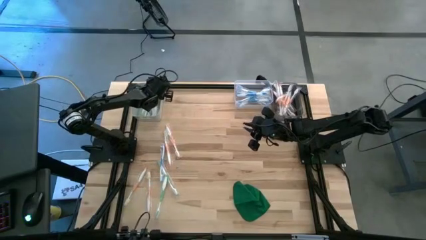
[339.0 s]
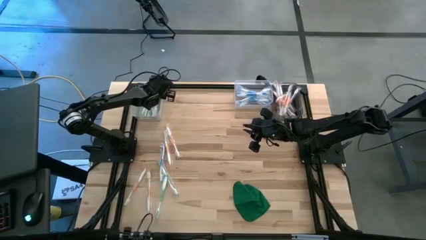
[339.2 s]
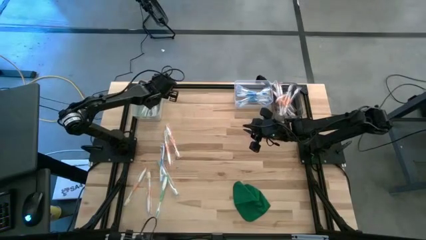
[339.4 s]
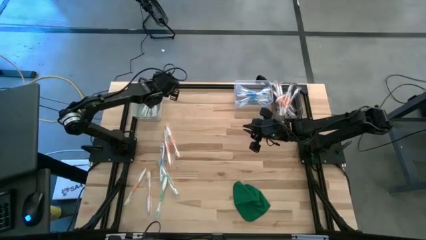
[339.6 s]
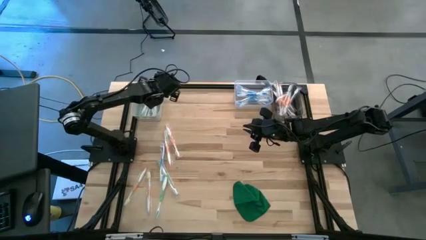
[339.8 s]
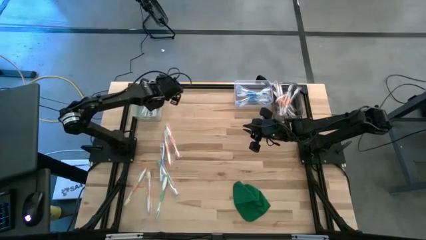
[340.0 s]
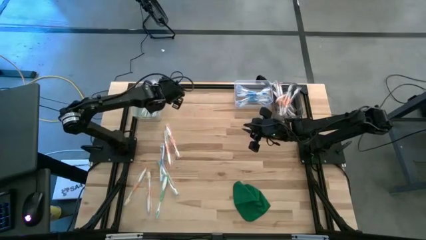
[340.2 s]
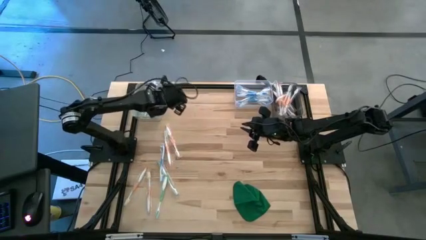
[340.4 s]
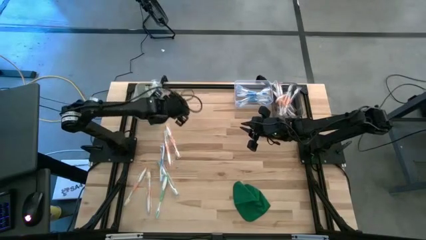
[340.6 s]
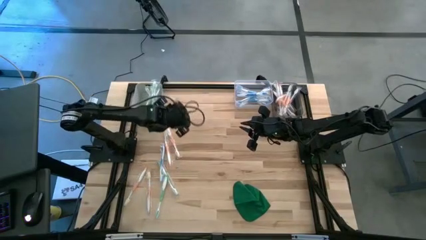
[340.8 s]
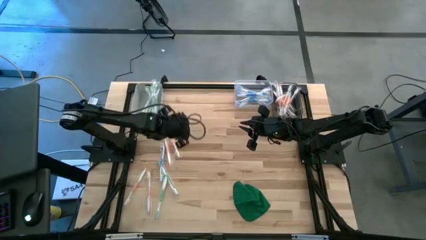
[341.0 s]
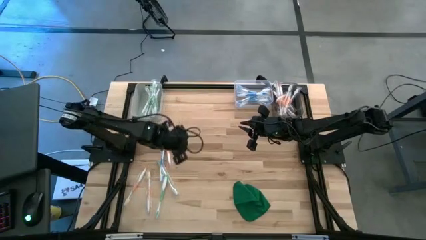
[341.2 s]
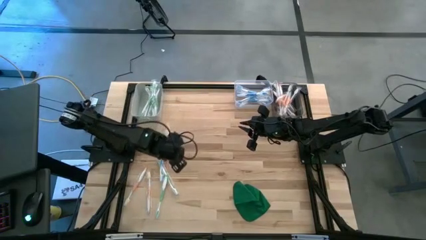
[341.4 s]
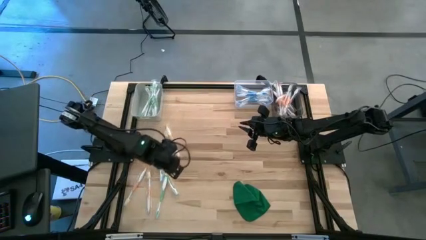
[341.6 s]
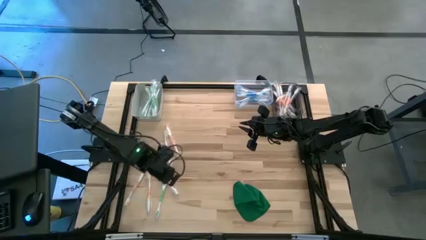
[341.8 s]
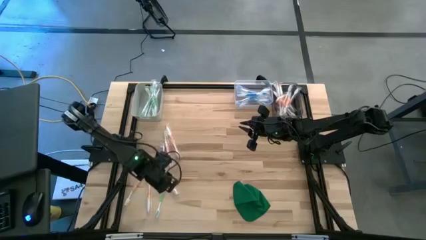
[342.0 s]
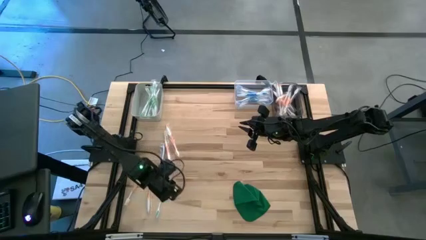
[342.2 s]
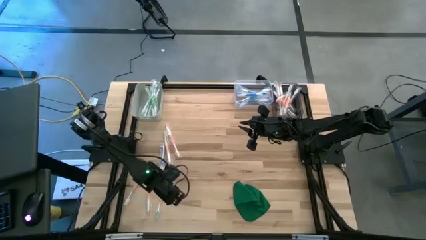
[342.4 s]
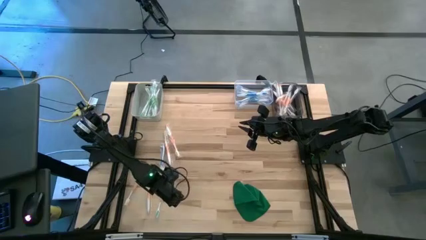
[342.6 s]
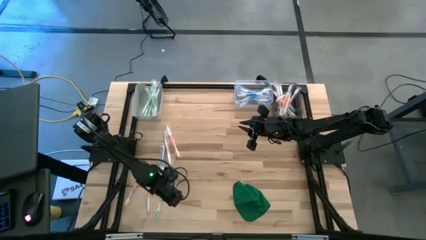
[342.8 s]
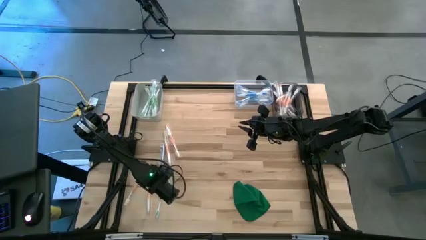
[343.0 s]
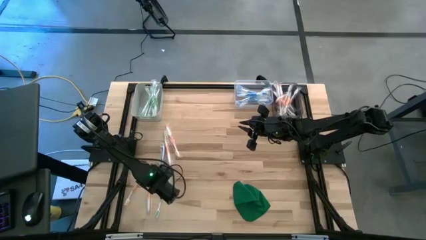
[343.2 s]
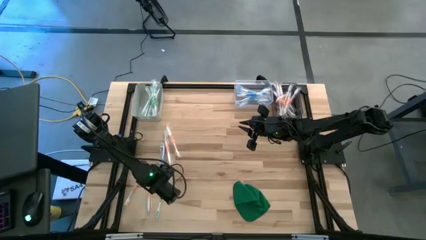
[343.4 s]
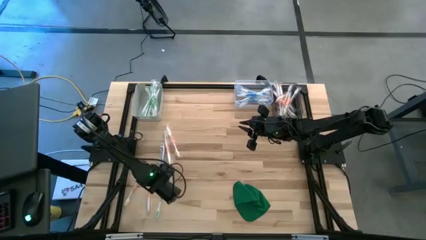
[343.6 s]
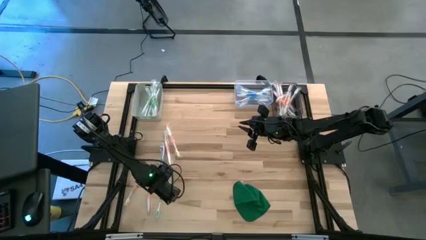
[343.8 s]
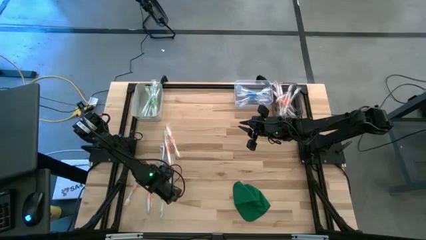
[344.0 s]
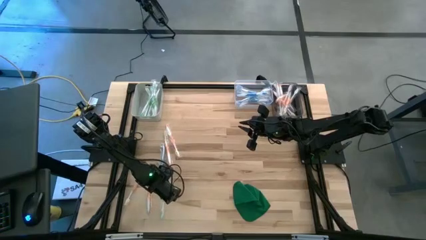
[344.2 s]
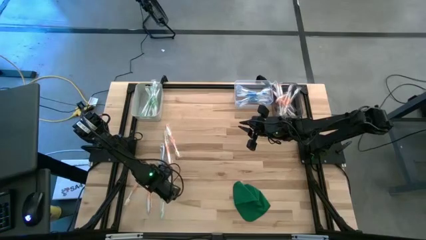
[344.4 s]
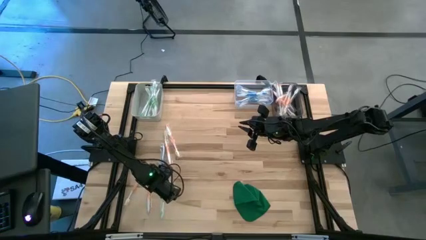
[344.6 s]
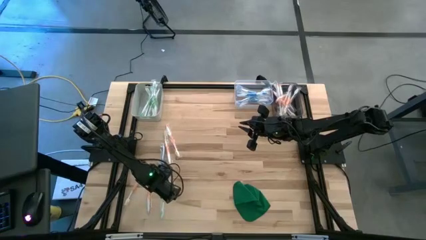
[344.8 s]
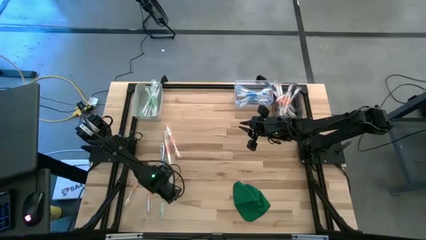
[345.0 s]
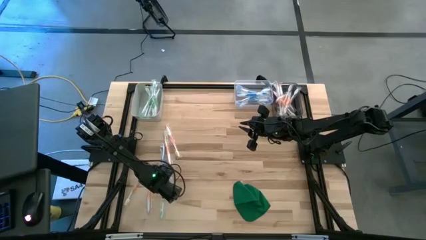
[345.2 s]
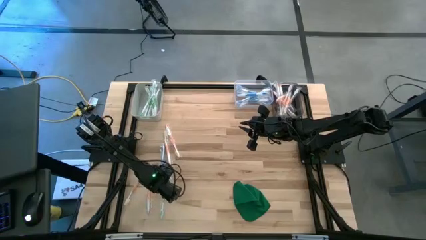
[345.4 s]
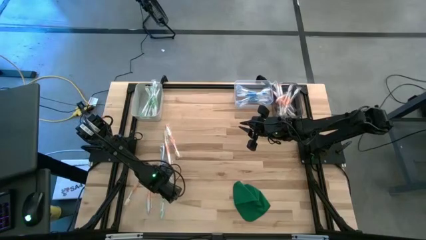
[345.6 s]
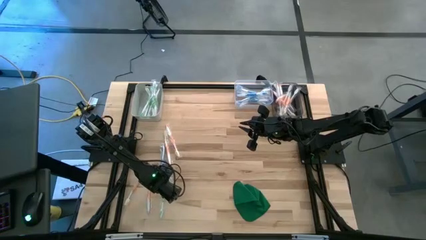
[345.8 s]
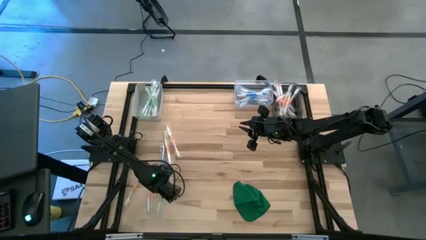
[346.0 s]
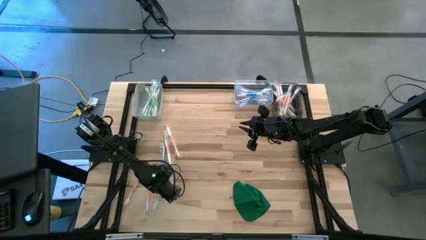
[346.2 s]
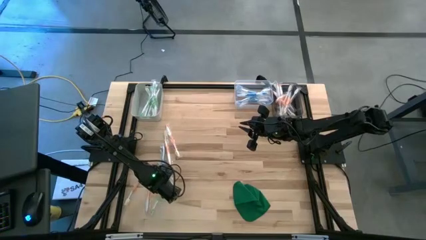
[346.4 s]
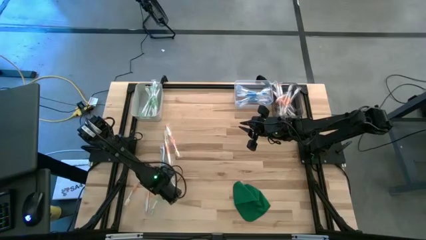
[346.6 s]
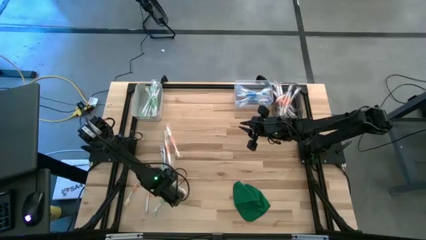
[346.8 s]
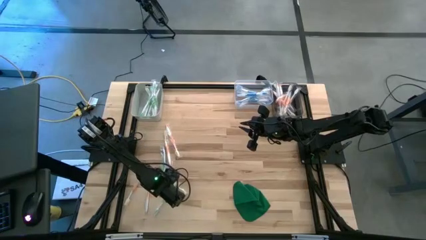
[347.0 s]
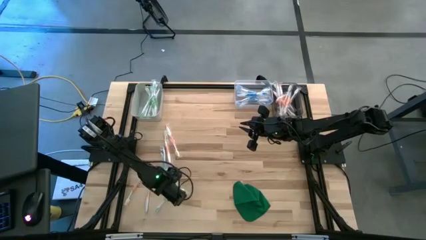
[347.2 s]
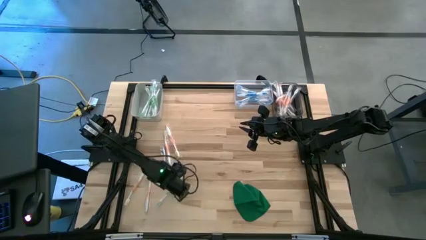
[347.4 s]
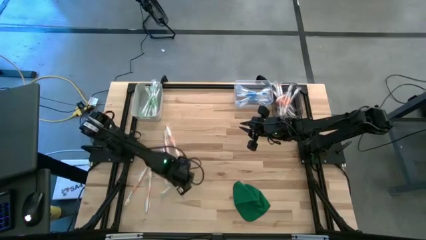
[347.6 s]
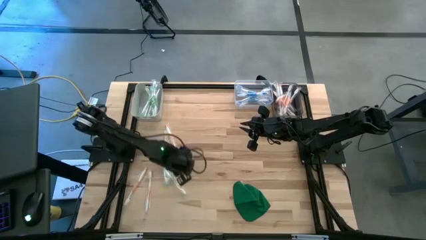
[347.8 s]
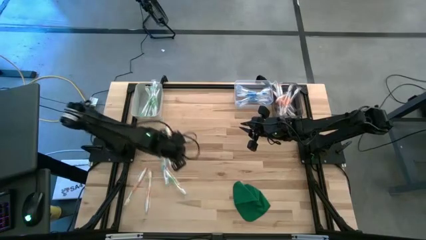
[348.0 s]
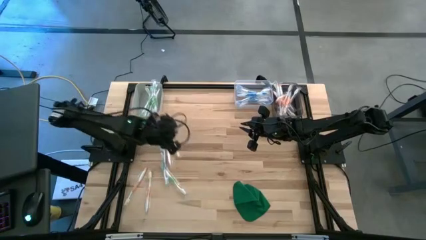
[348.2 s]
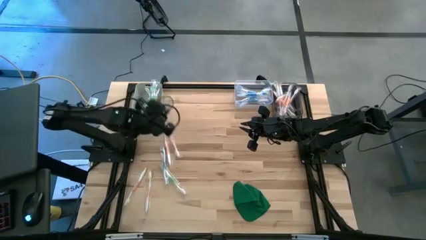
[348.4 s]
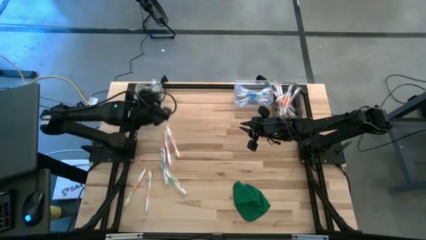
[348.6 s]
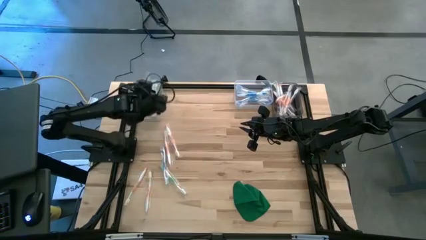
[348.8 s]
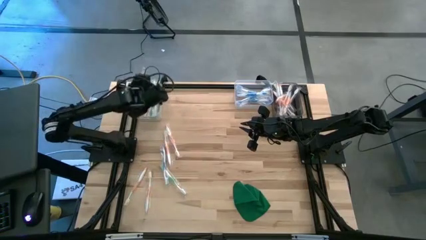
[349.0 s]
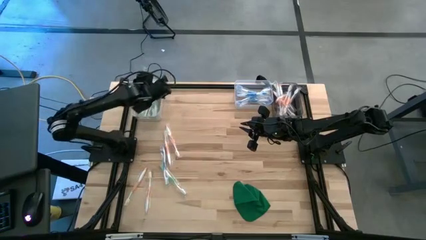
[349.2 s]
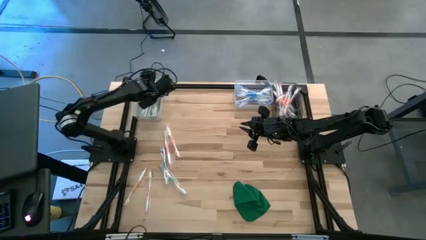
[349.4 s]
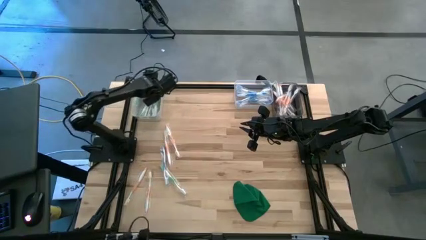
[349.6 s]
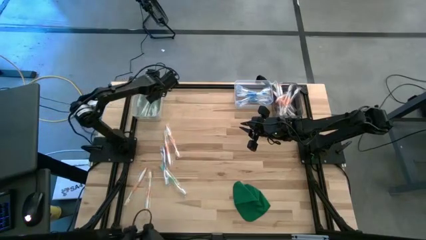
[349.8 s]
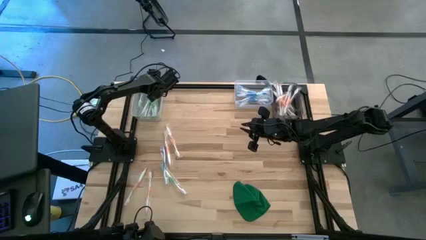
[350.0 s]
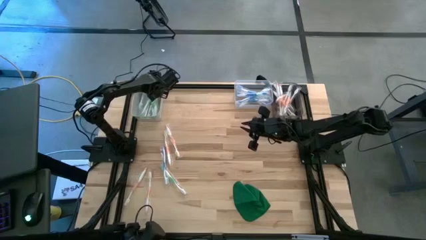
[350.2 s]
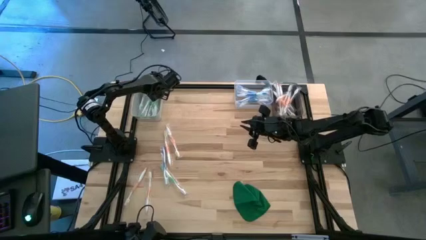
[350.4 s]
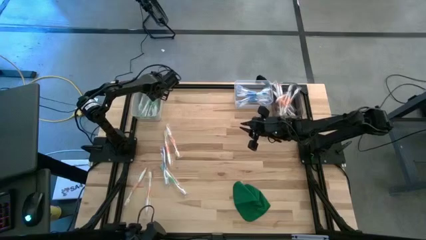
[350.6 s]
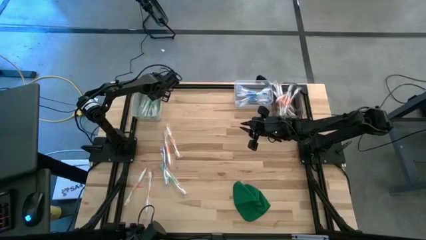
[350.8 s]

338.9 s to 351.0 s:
Task: Pick & Place Toothbrushes
Put the green toothbrush into the gray bin
